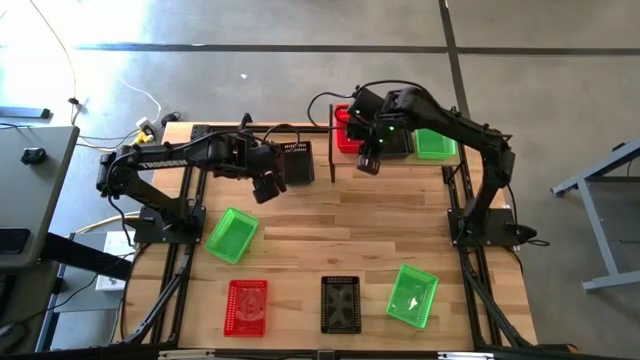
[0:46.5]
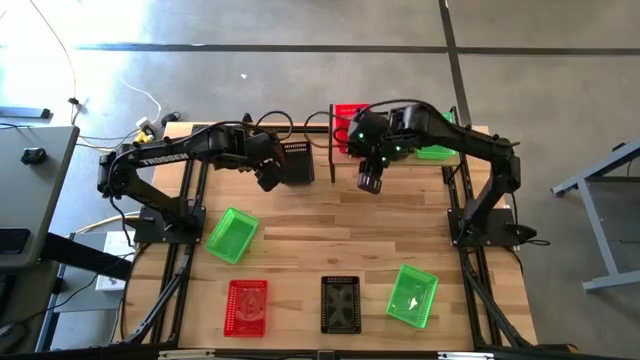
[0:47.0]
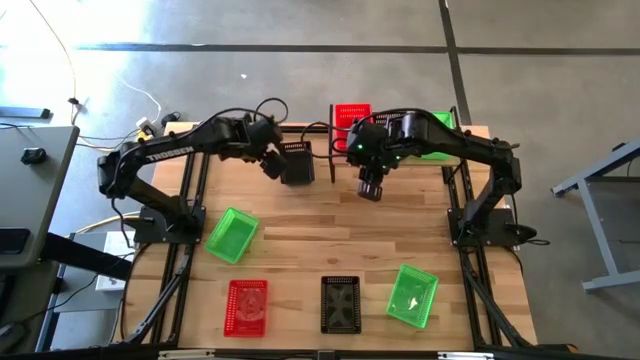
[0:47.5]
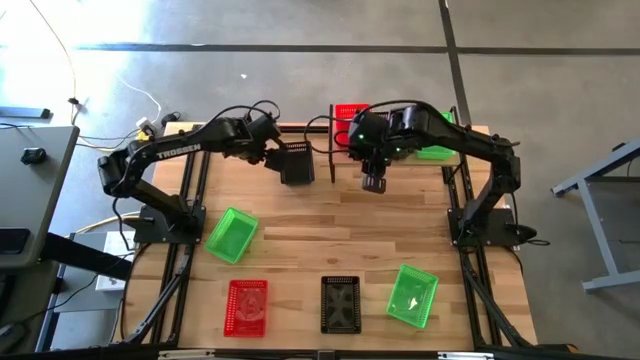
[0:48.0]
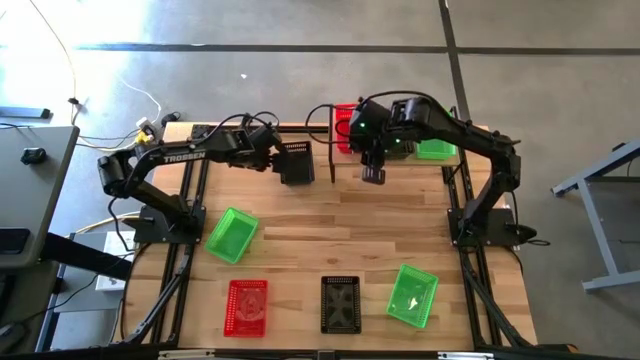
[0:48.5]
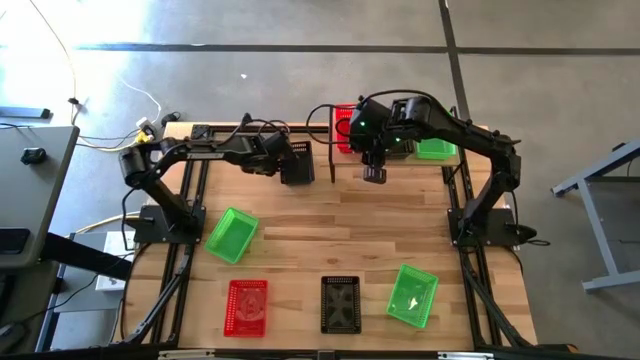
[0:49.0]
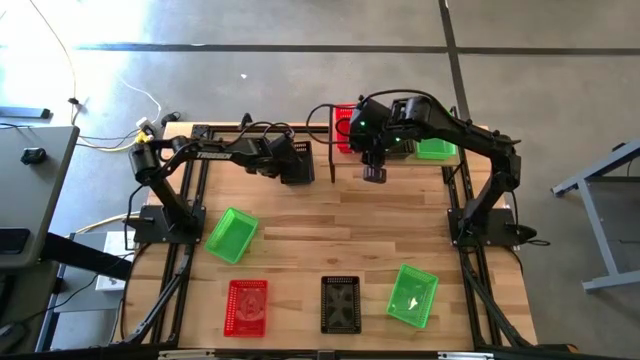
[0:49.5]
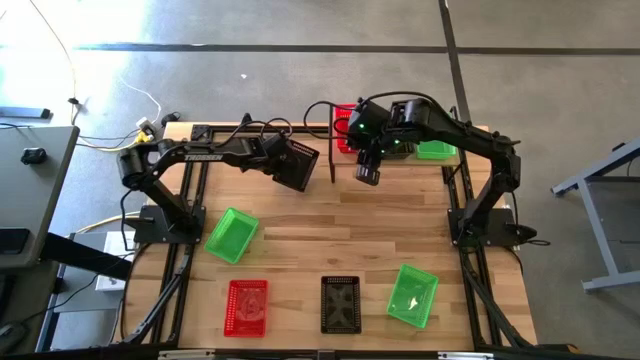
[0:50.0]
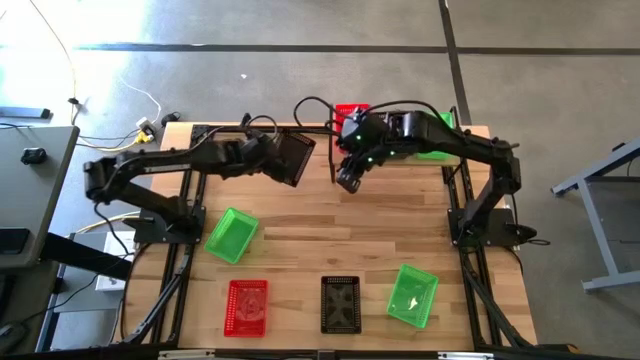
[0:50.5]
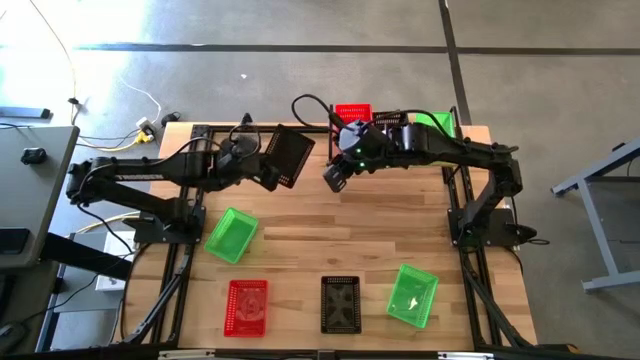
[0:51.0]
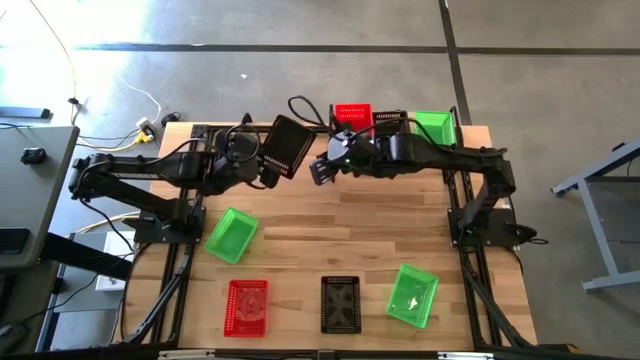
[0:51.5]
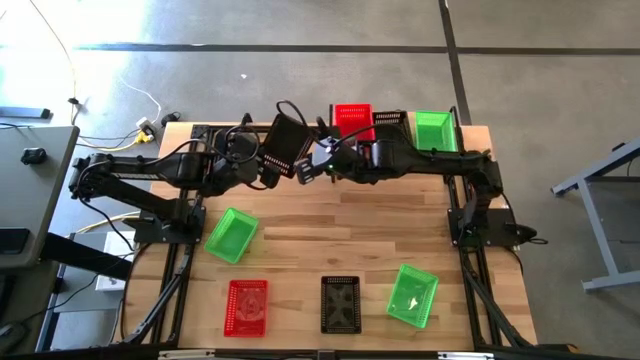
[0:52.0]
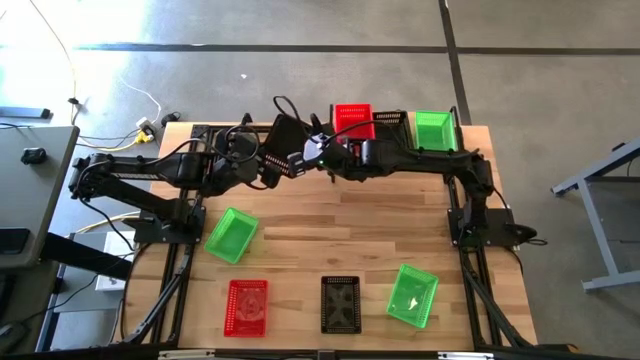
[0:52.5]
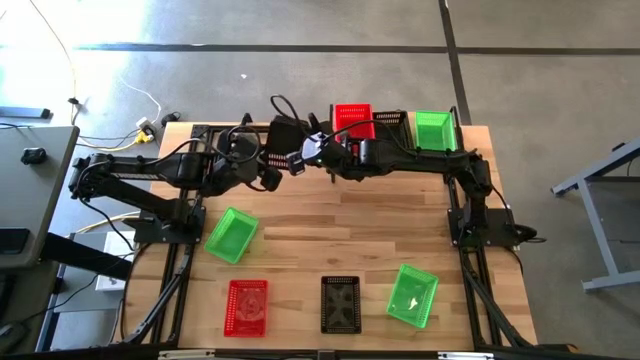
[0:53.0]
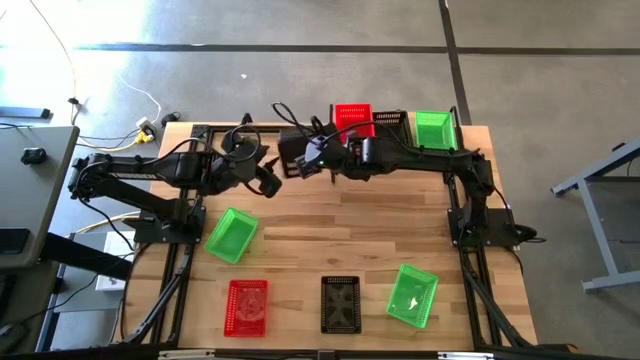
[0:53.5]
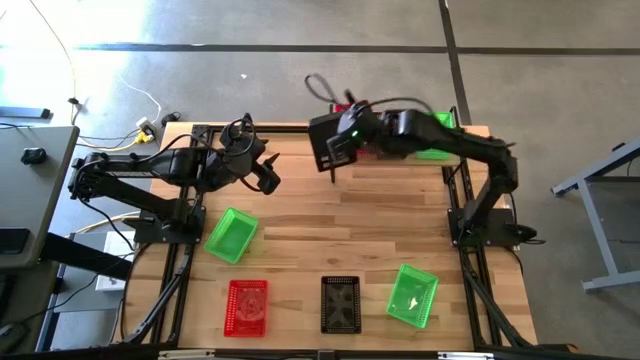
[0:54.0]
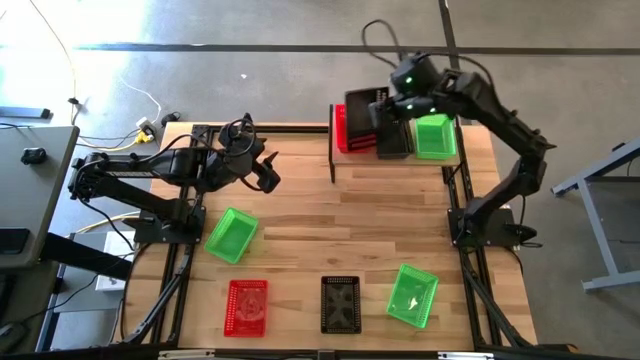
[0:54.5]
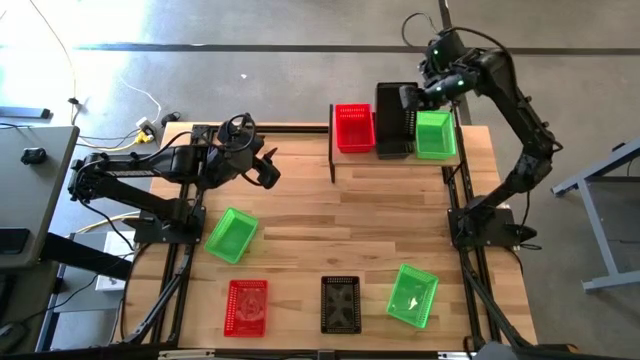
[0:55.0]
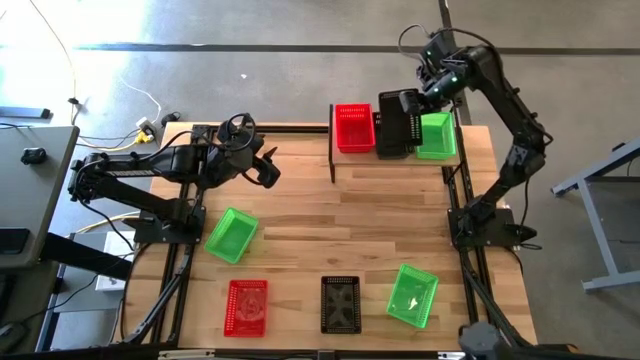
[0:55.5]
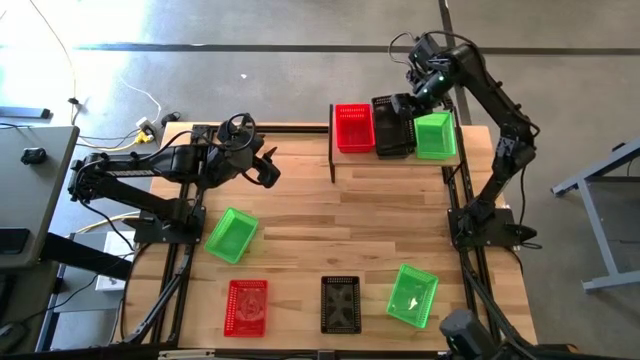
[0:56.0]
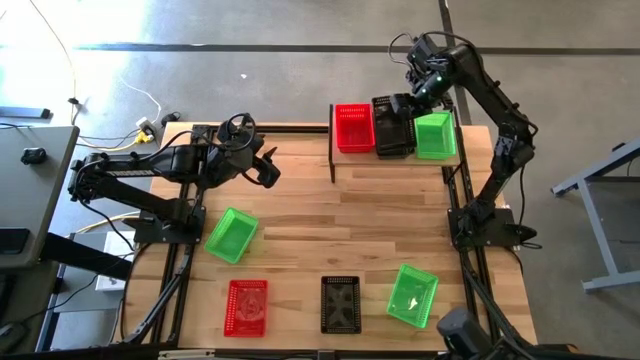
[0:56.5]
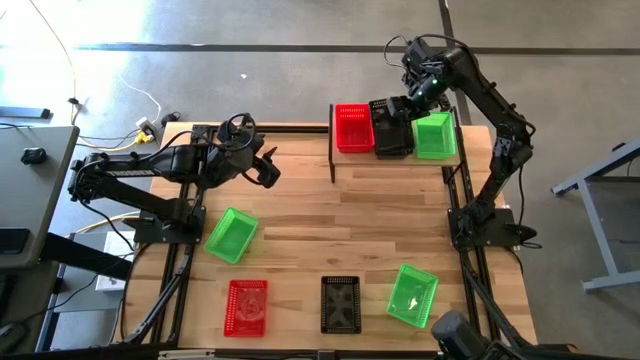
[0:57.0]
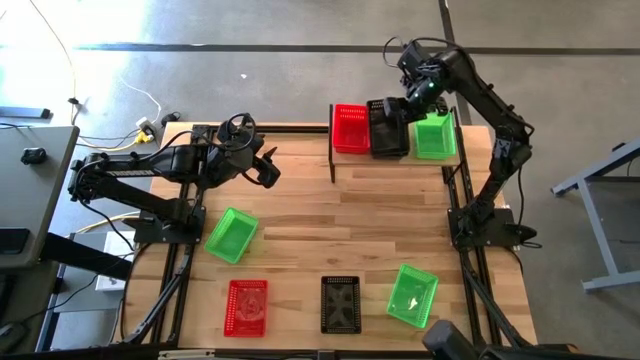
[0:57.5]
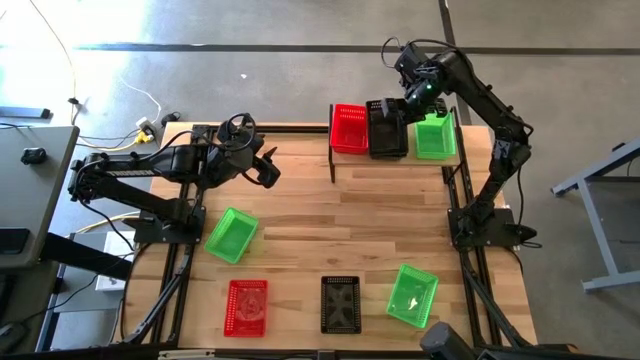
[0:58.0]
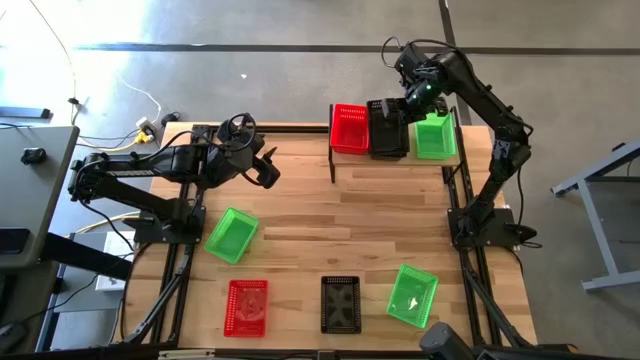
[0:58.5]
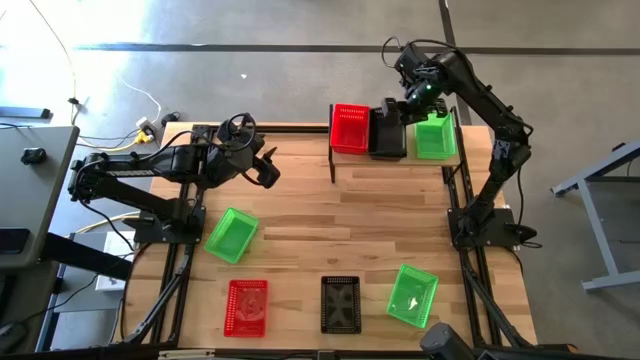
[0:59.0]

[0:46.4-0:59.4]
Task: Stack baskets on shelf by color
Stack the top black bin on top of the black bin on the shelf

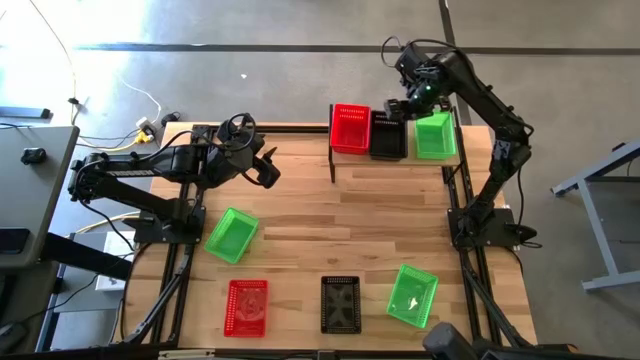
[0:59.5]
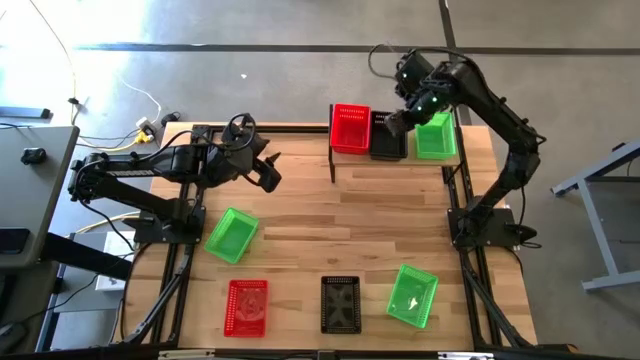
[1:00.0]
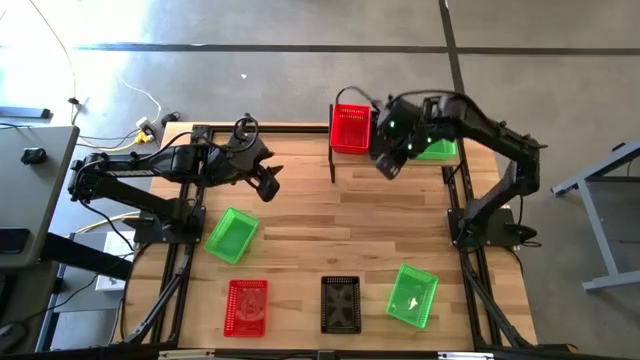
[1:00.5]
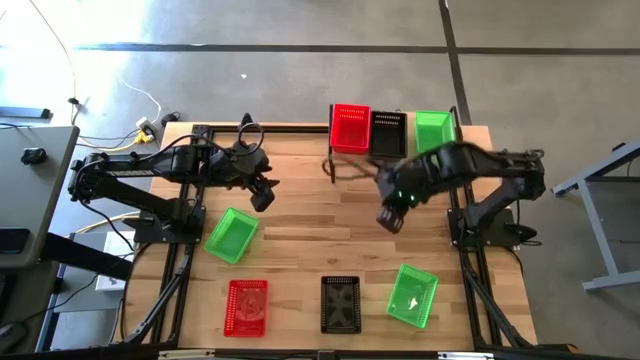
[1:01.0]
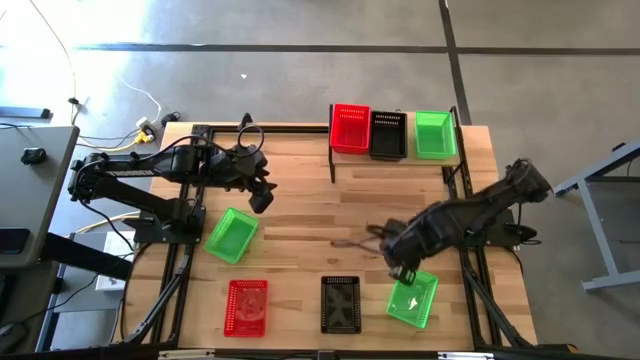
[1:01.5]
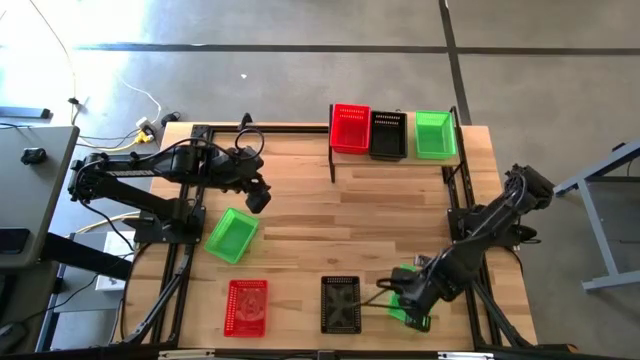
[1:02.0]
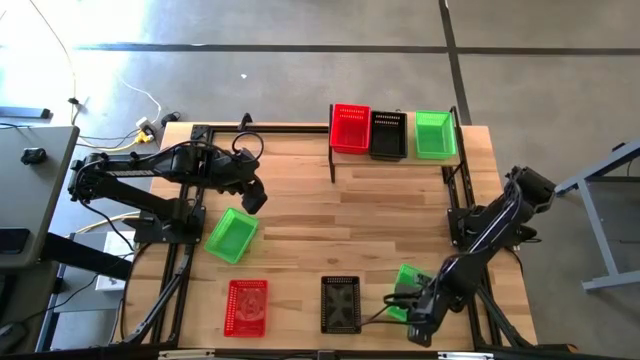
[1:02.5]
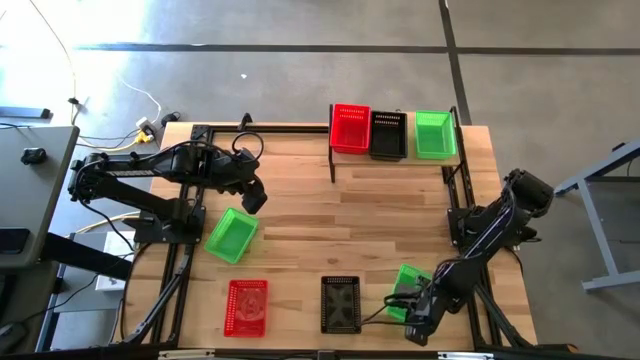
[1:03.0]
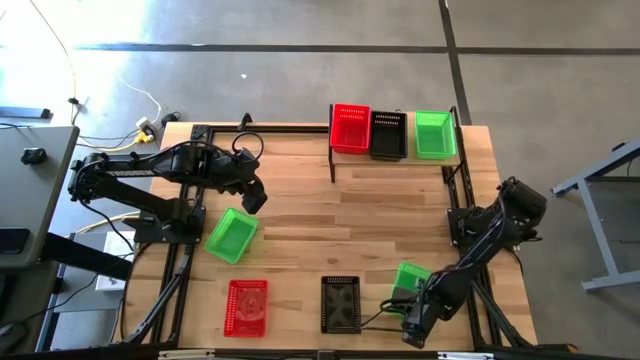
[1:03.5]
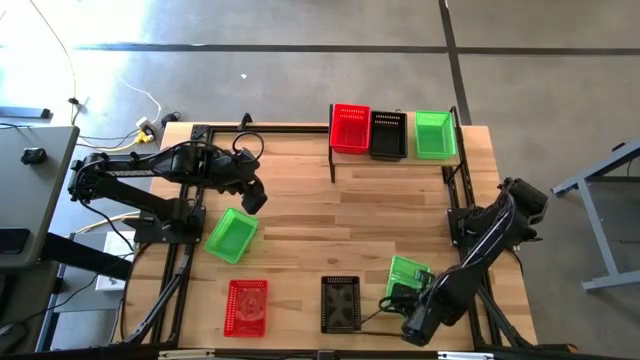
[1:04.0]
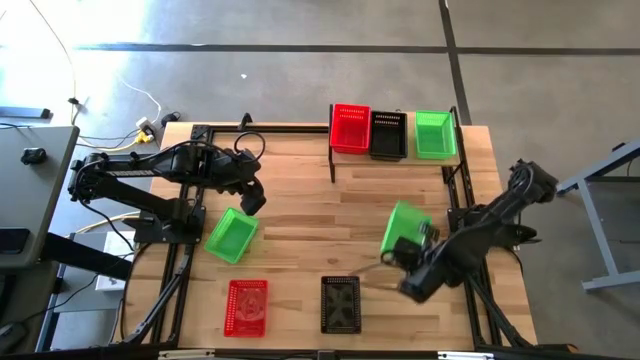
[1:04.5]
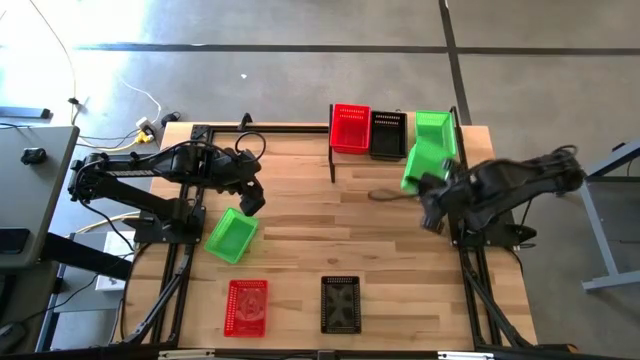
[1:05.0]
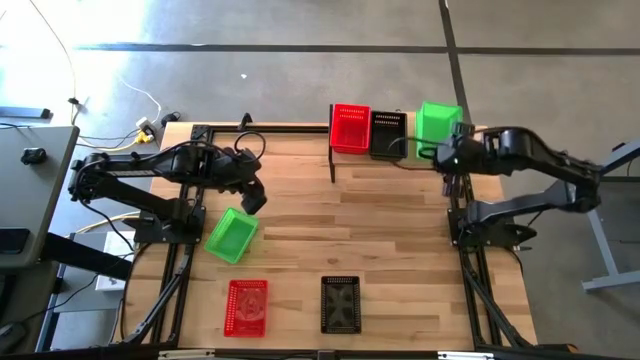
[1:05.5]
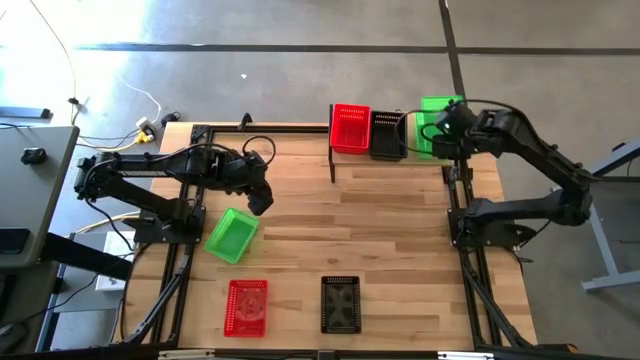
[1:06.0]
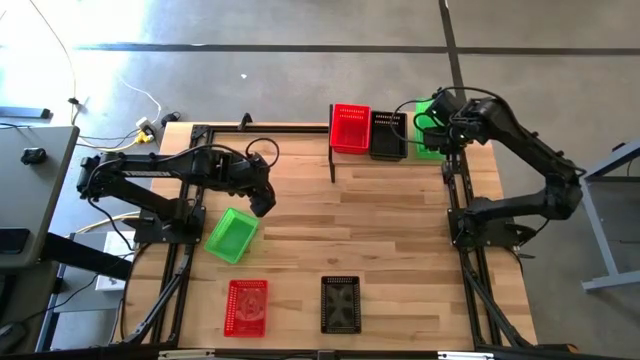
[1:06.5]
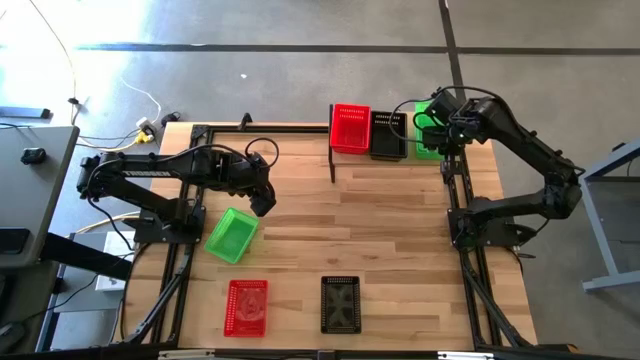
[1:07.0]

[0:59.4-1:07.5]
Stack the bottom green bin on top of the green bin on the shelf

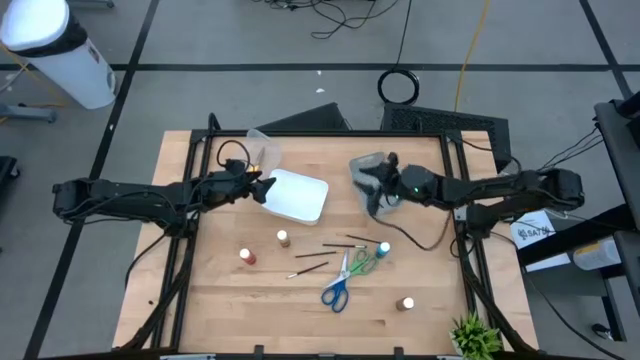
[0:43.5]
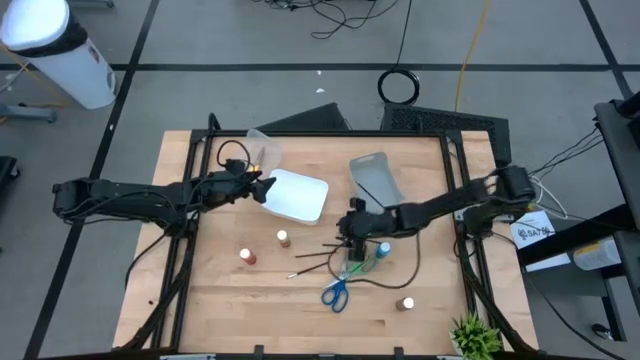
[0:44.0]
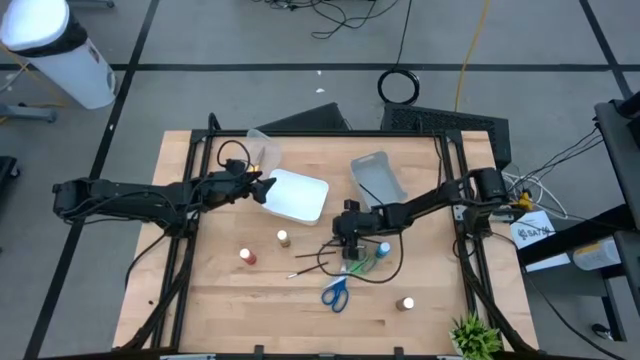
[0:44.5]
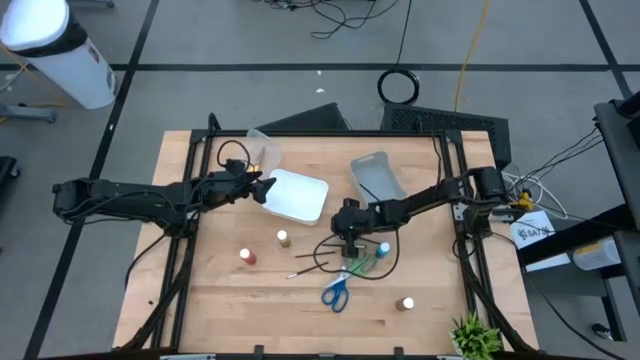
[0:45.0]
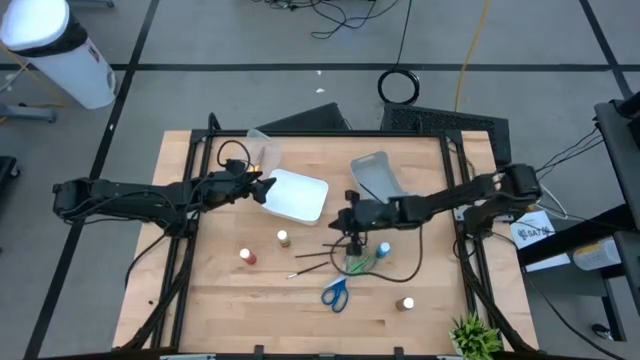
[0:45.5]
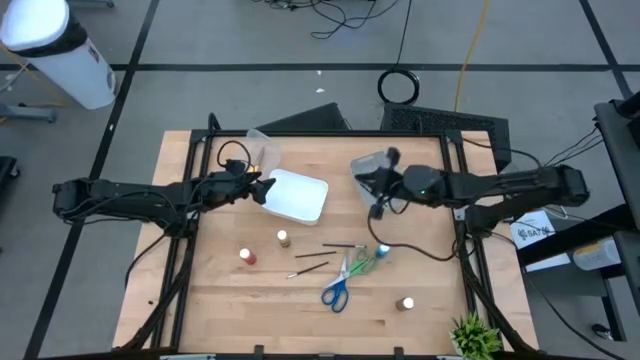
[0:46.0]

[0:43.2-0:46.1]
Task: Pick & Place Paint Supplies
Put the top gold and black paintbrush into the gray bin
